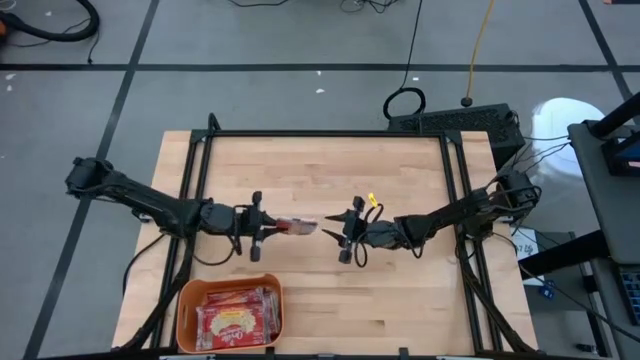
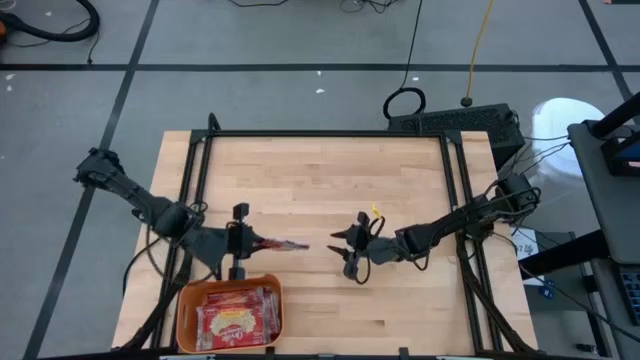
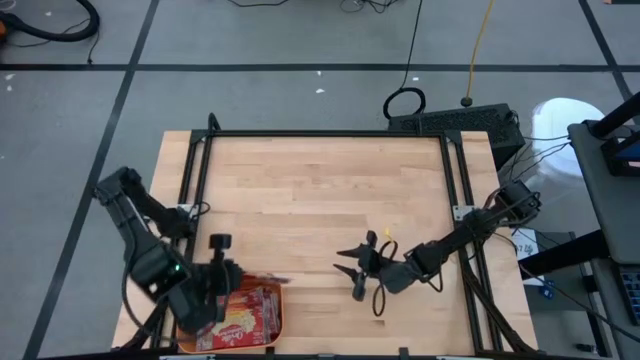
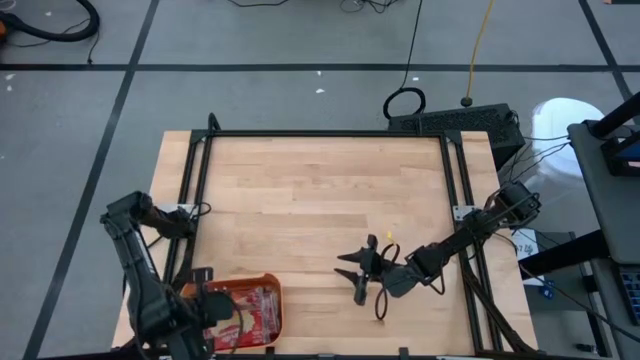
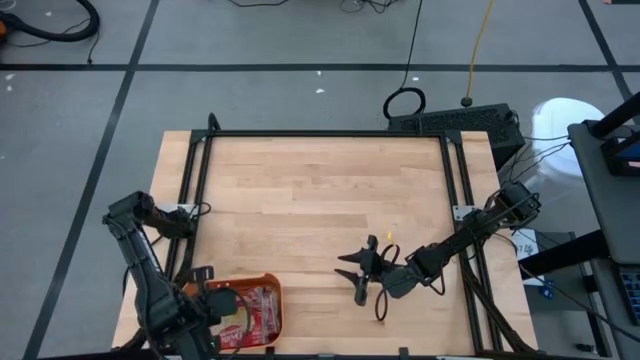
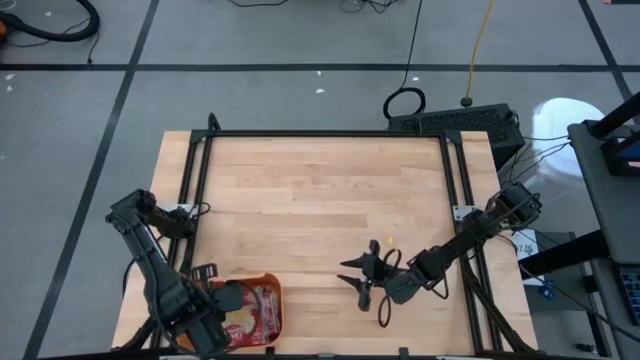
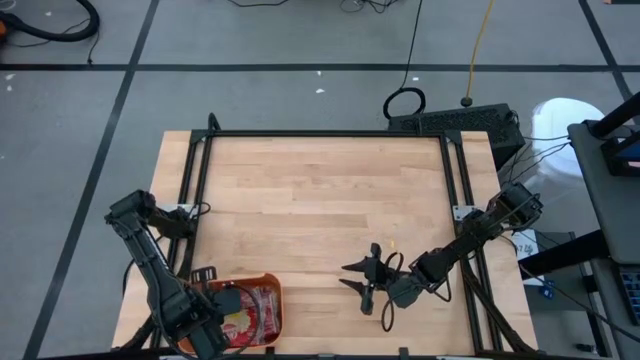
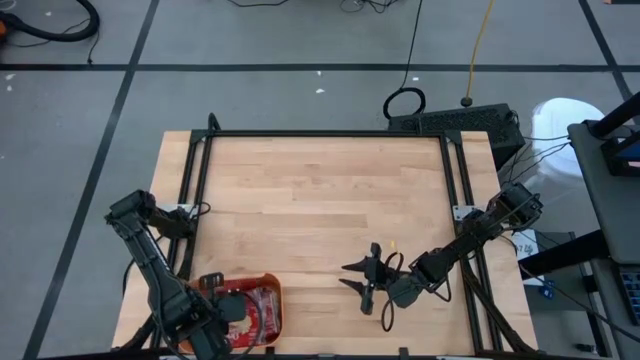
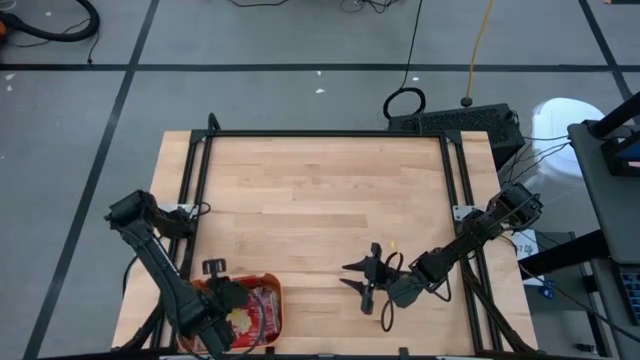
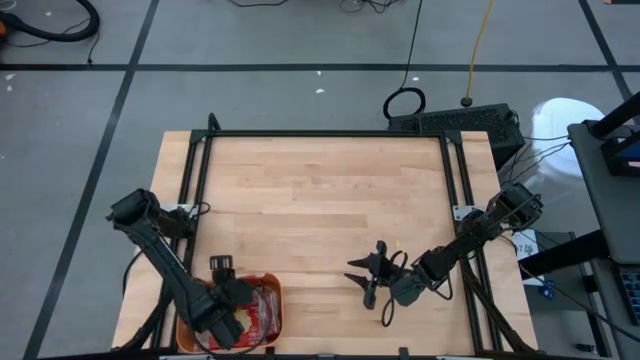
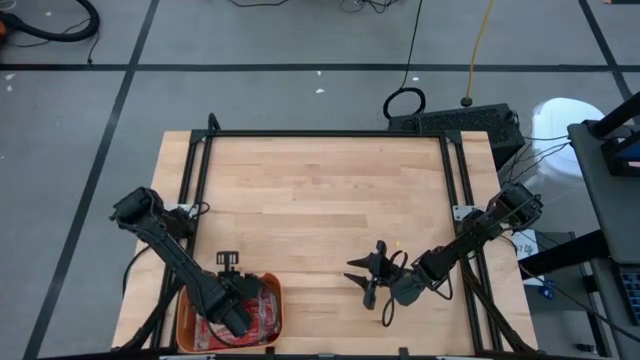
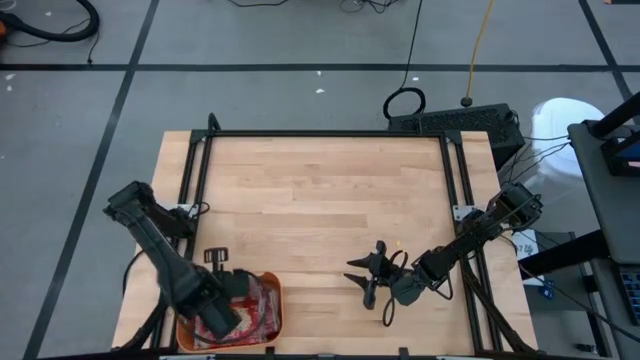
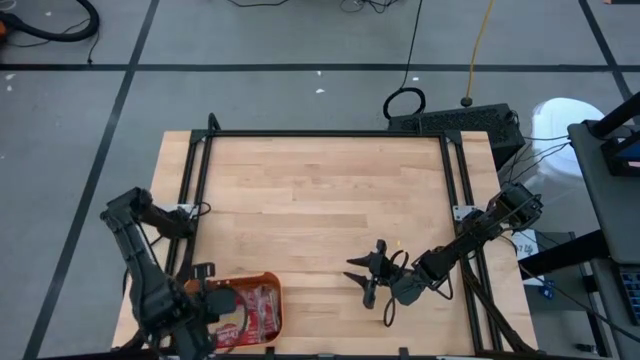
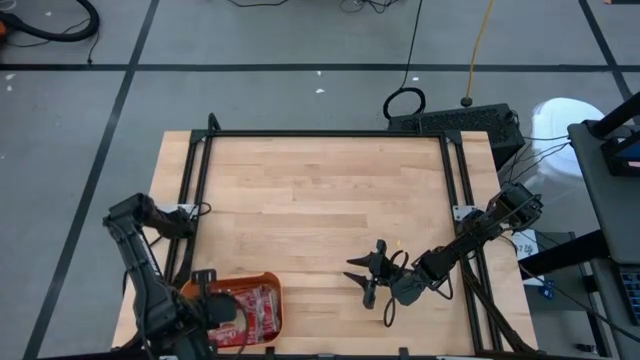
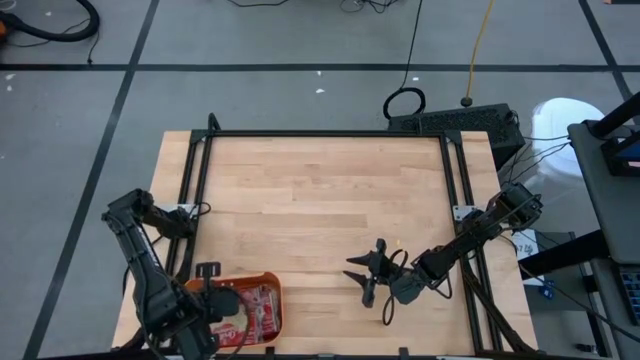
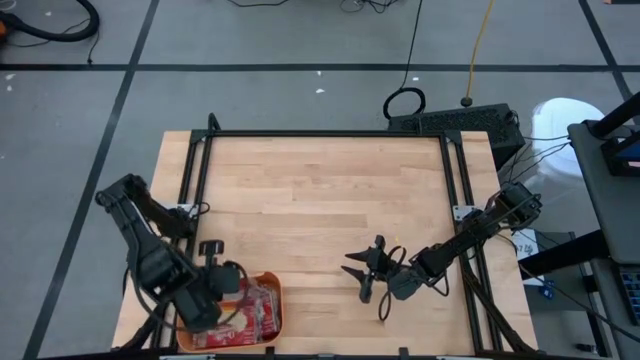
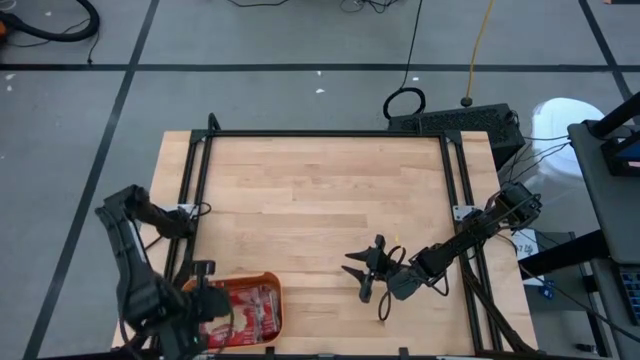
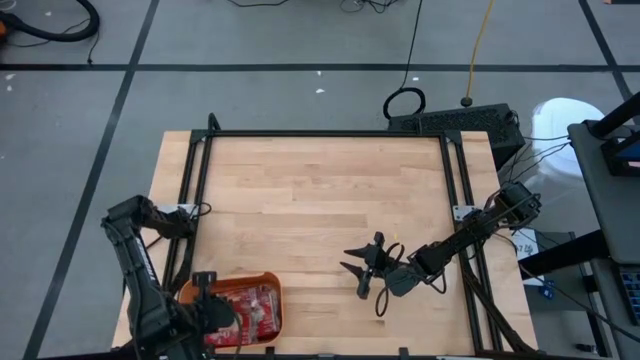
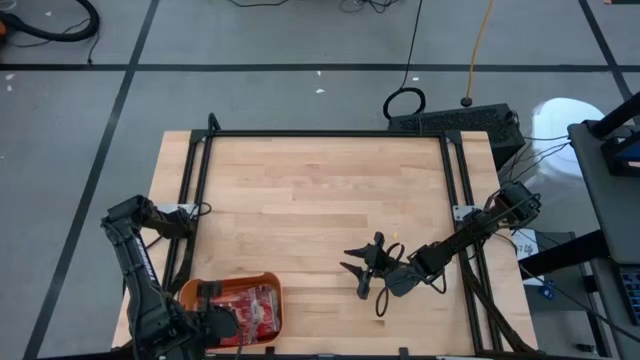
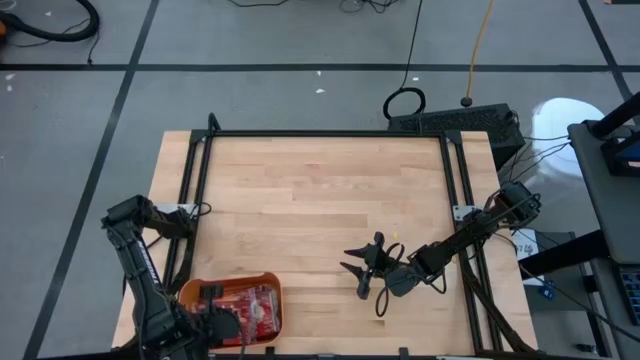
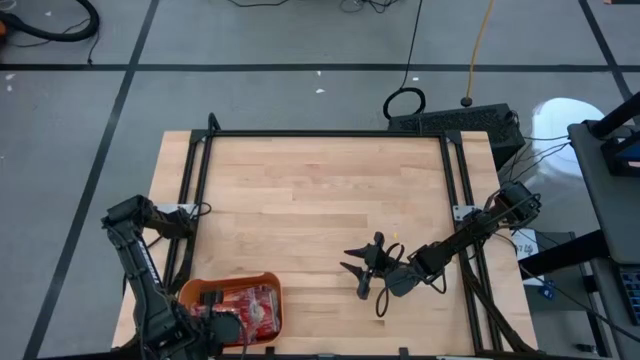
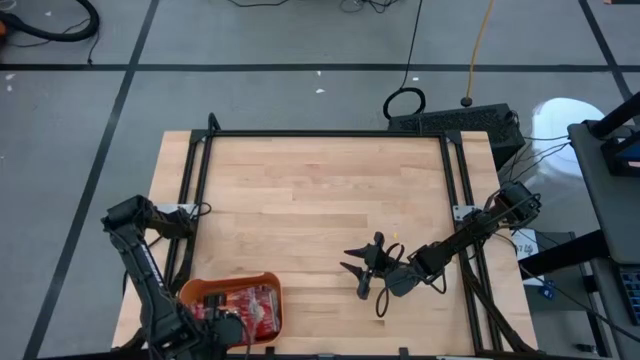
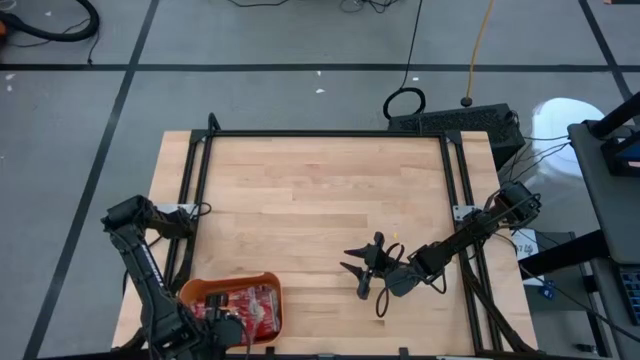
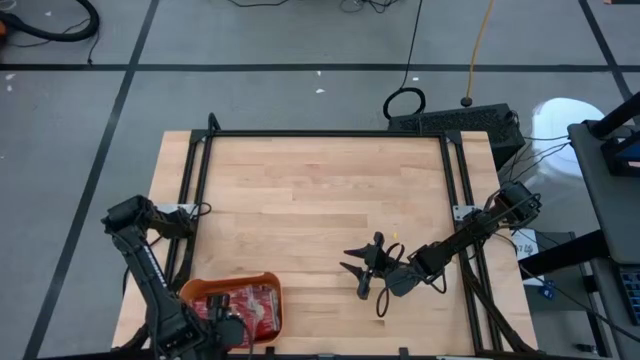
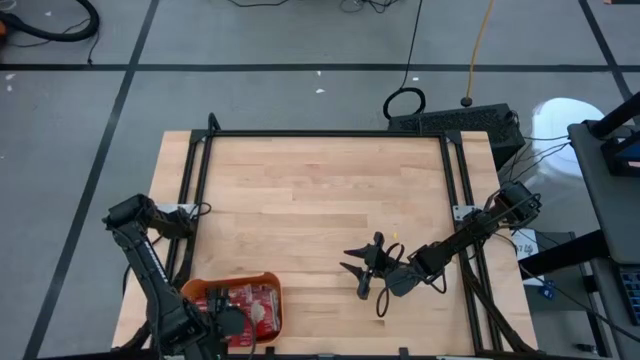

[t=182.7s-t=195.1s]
Task: Sort popcorn bags into baskets
Put the popcorn bag into the orange bin

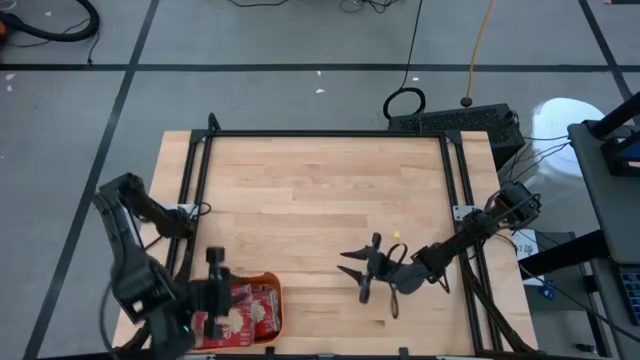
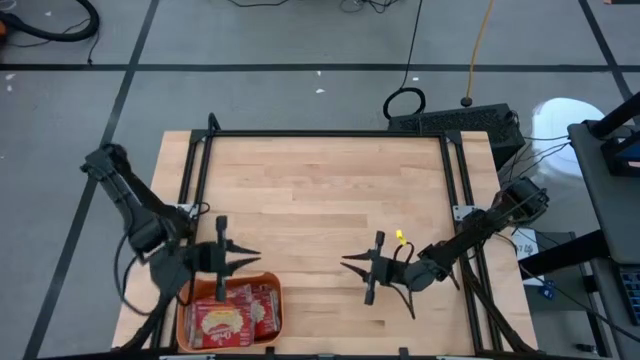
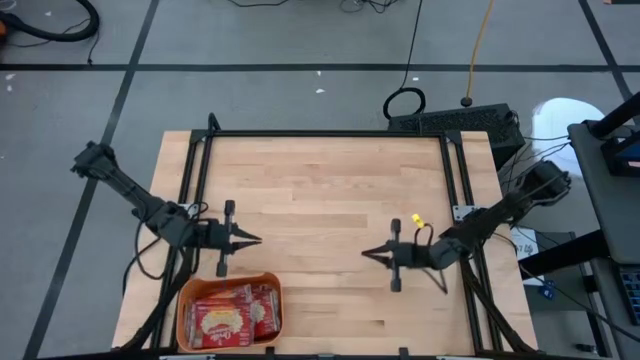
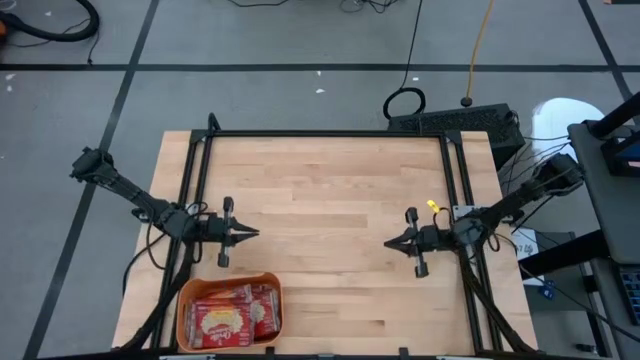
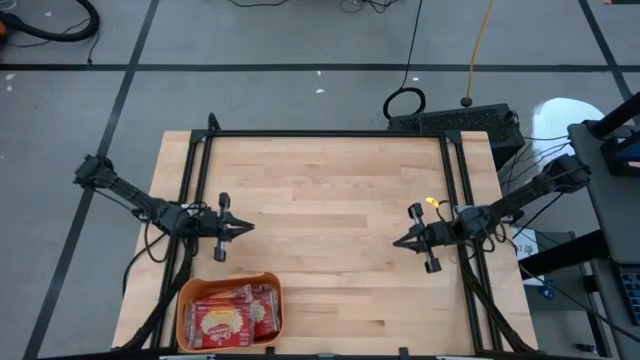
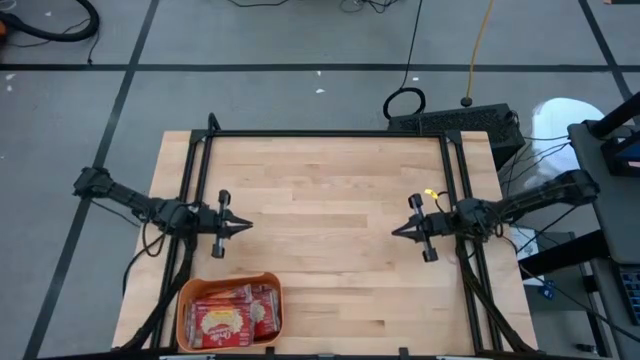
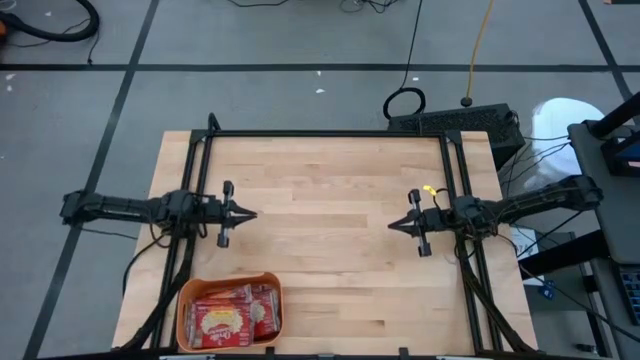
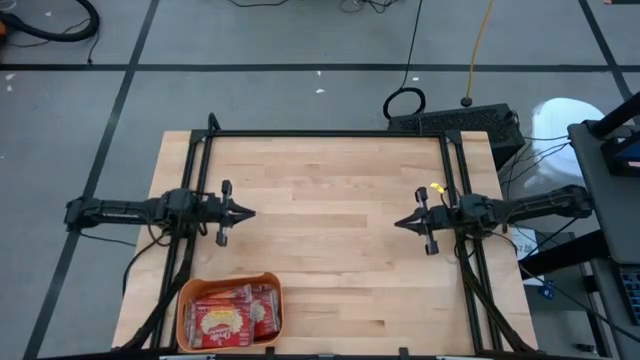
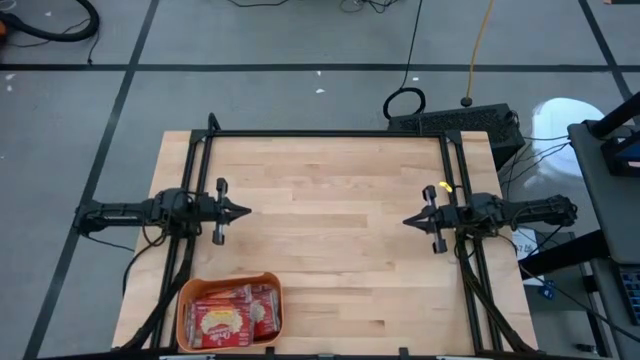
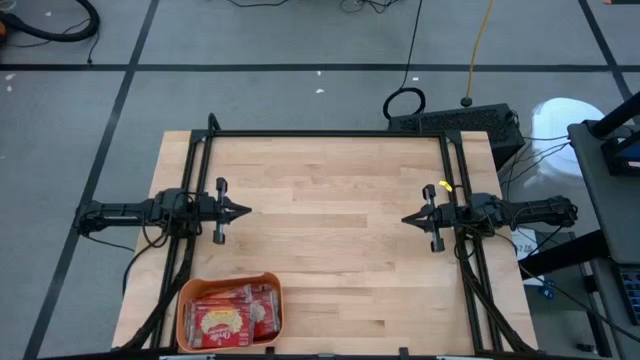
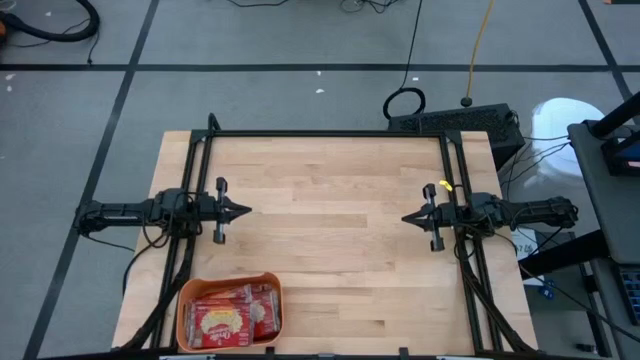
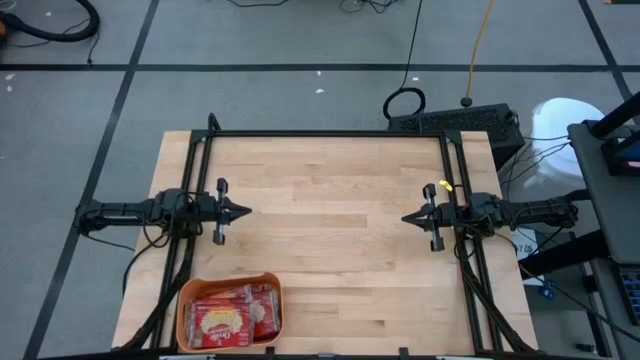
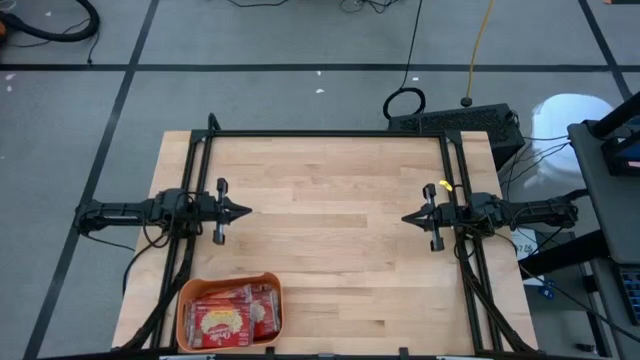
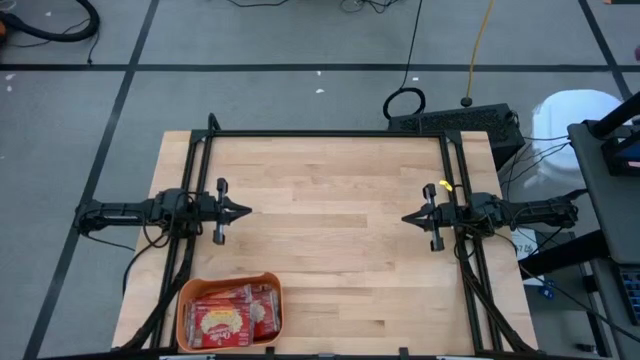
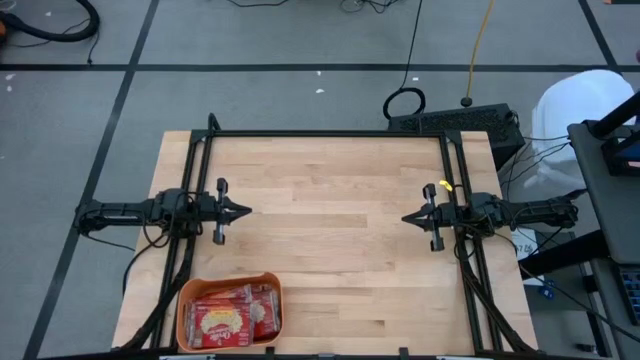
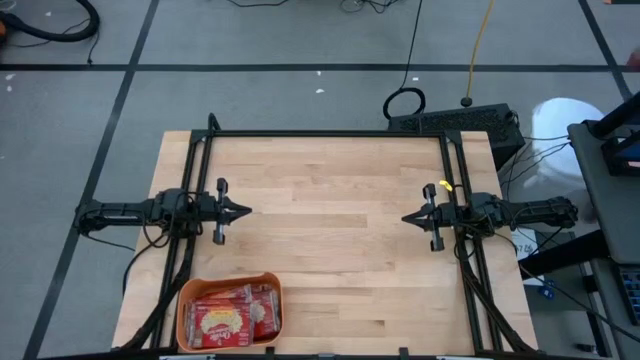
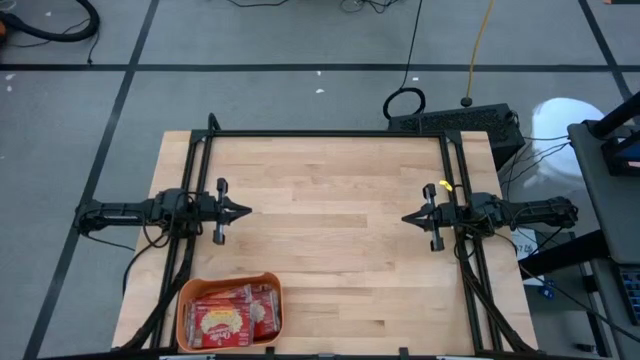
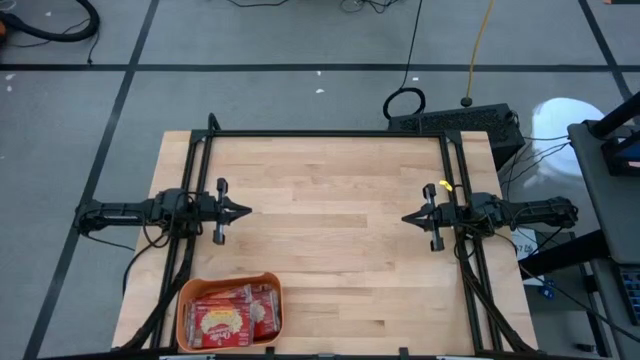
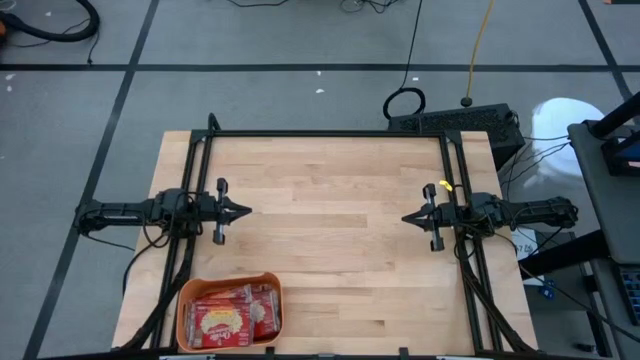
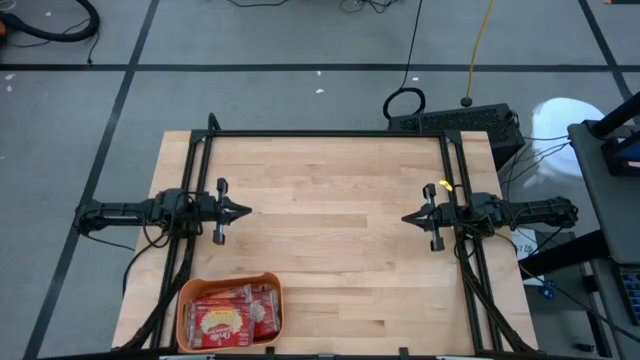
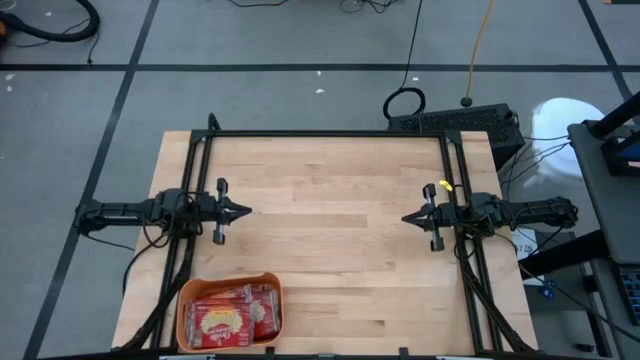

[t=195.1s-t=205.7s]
Return to Home Position
